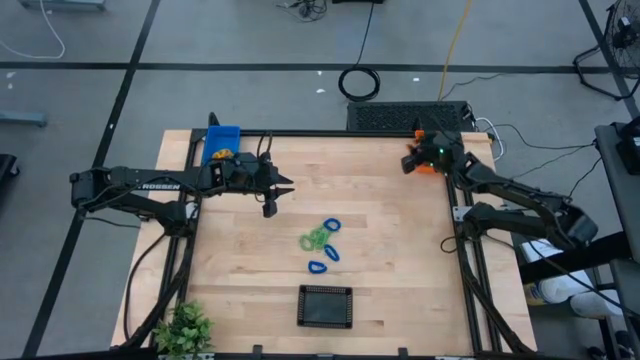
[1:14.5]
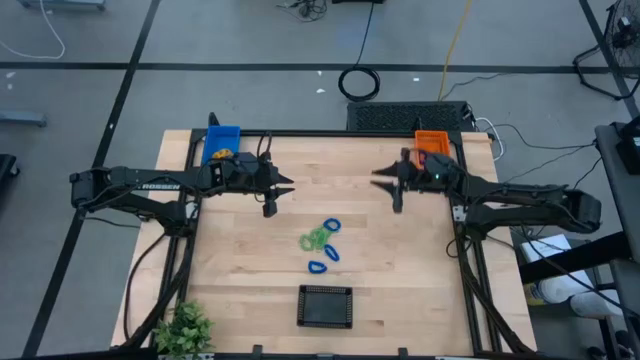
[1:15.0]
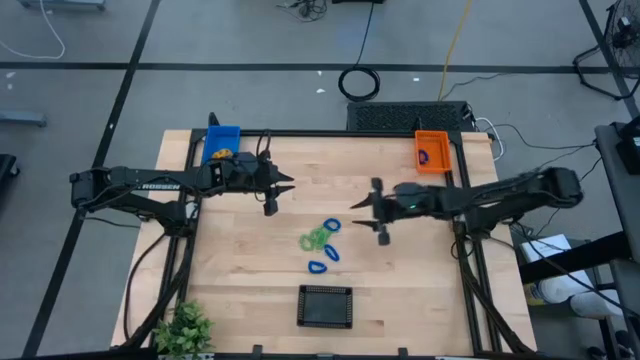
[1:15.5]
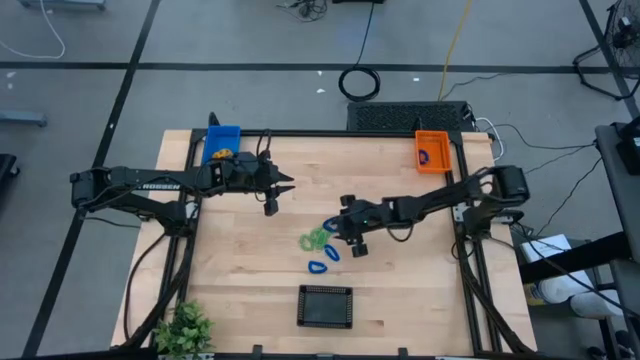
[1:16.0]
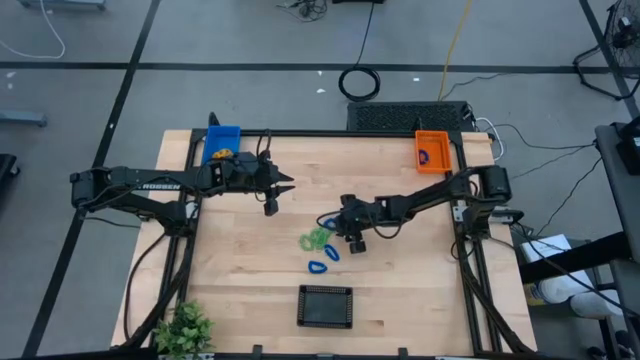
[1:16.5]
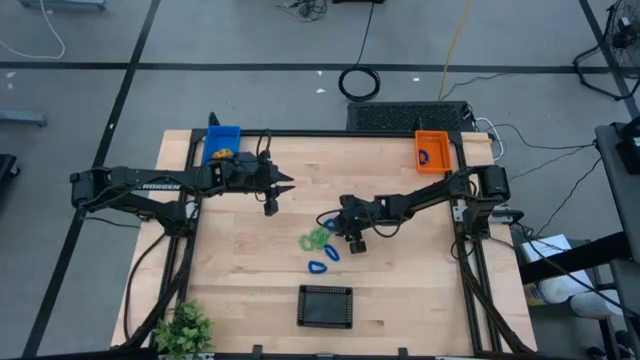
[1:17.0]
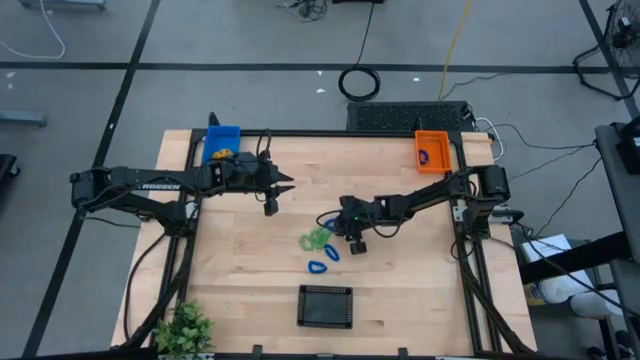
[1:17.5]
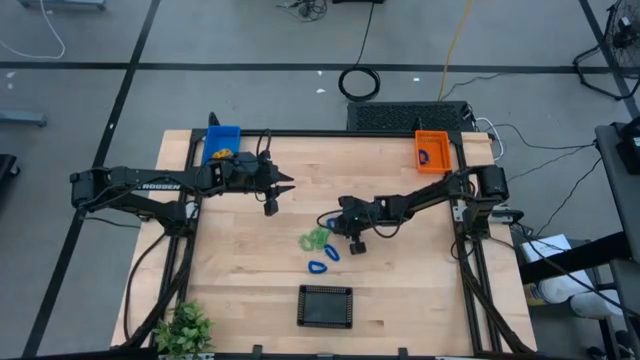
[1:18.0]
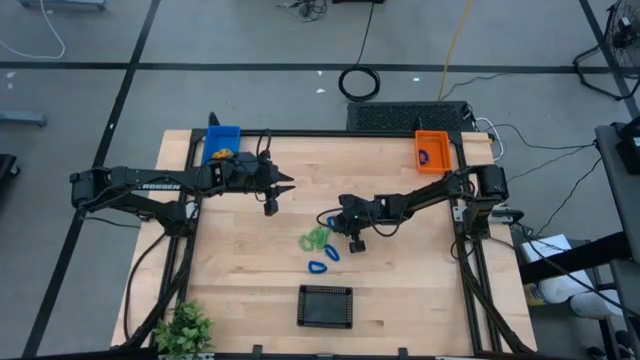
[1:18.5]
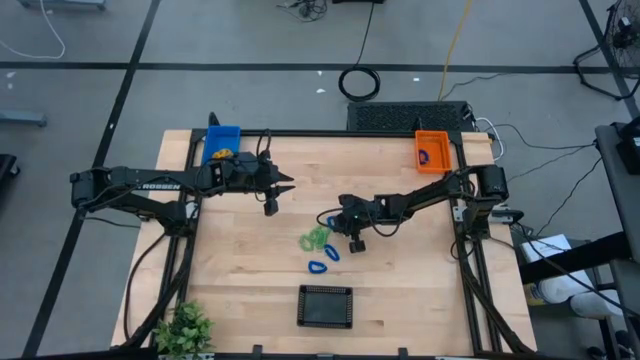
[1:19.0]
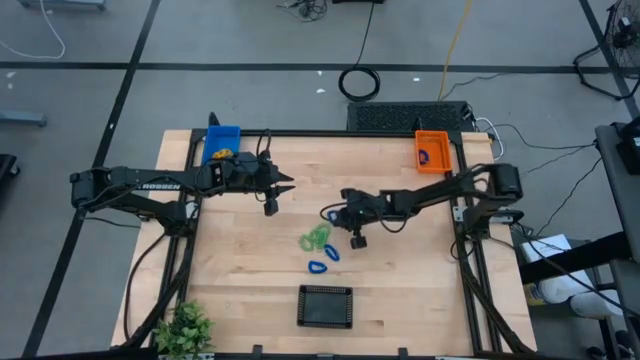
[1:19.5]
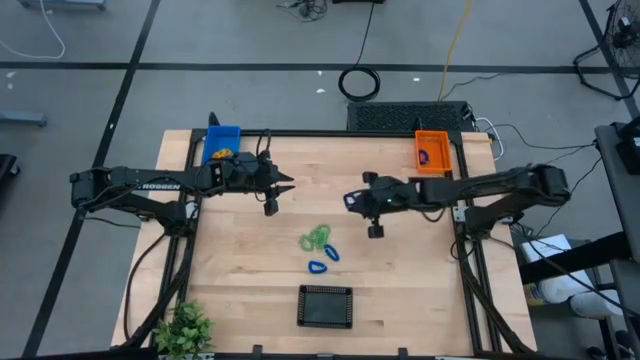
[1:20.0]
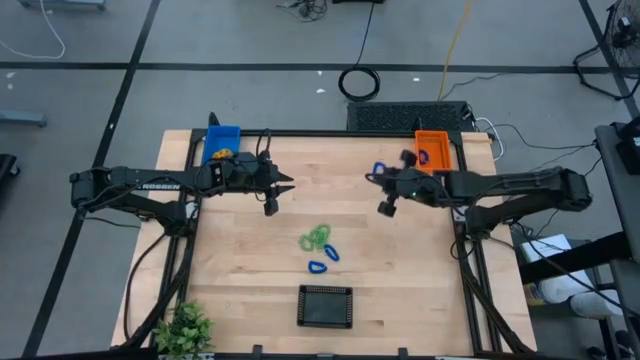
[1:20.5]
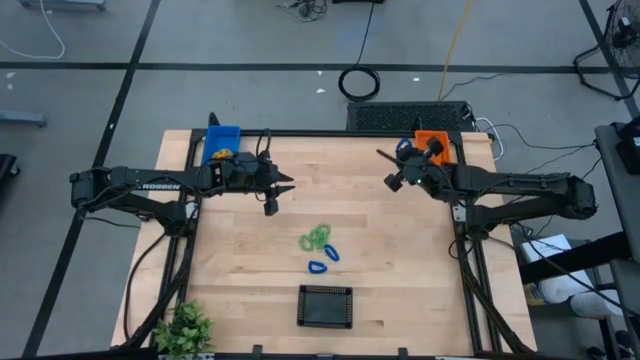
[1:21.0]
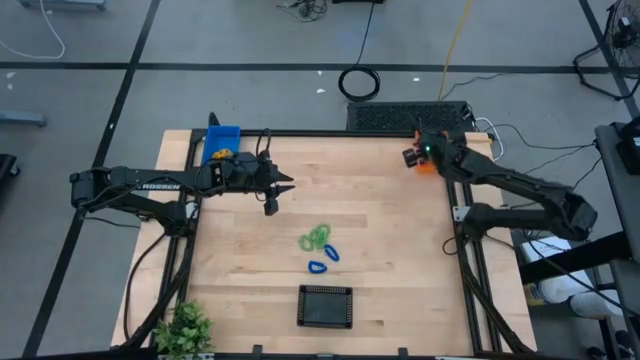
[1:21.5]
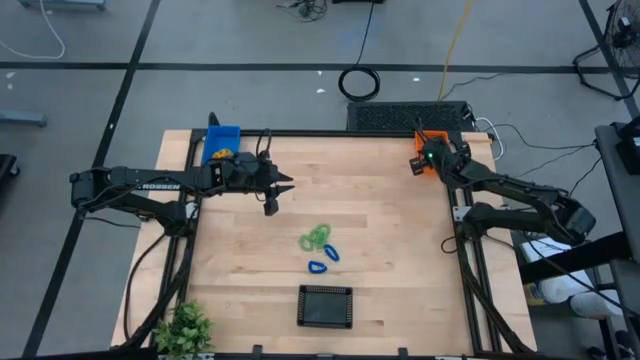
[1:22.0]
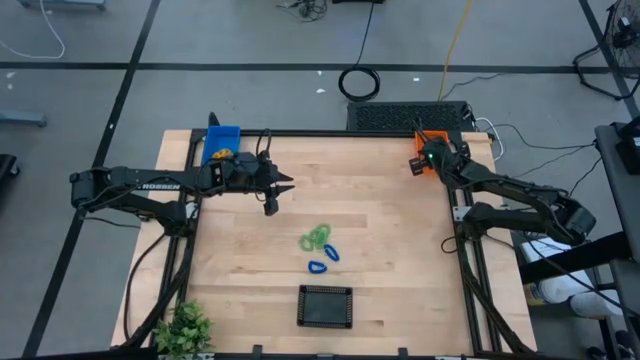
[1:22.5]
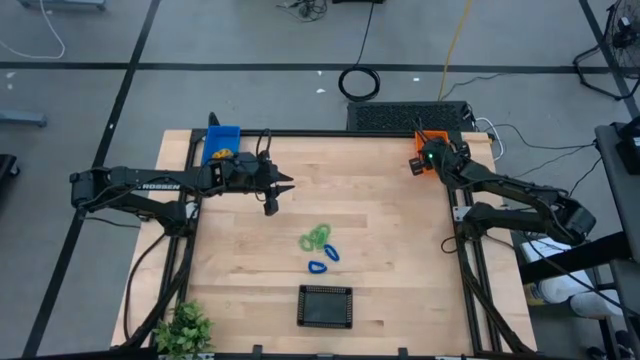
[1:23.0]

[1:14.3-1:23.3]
Task: Sort spring keychains into baskets
Put the blue spring keychain into the orange basket

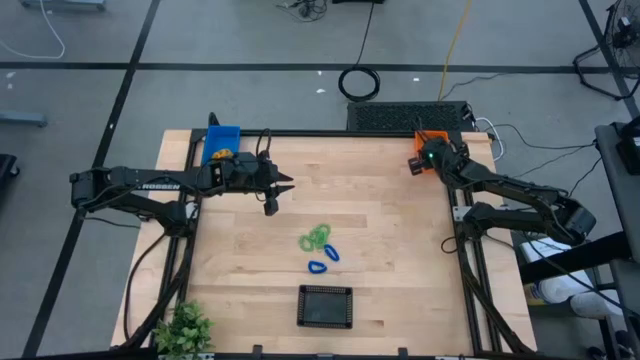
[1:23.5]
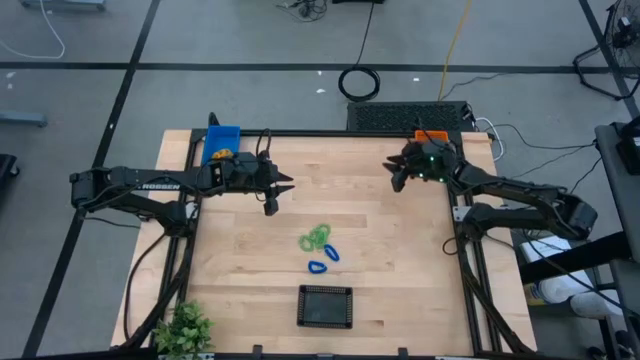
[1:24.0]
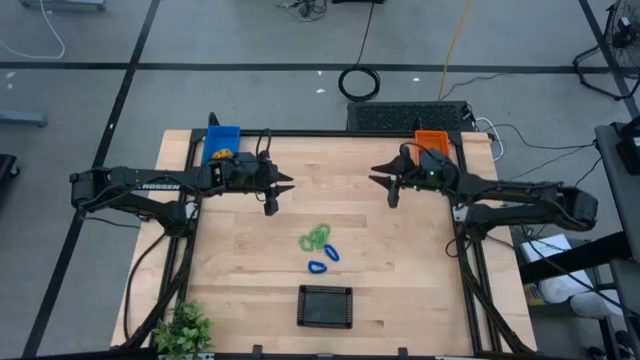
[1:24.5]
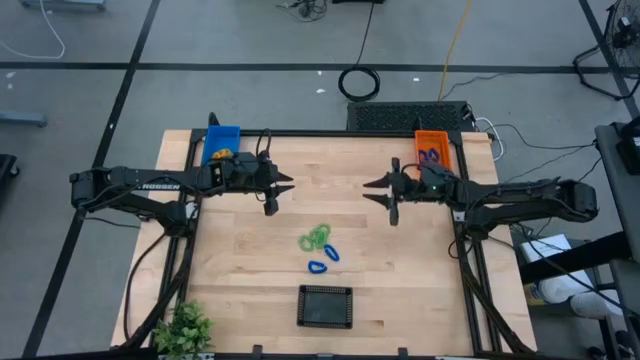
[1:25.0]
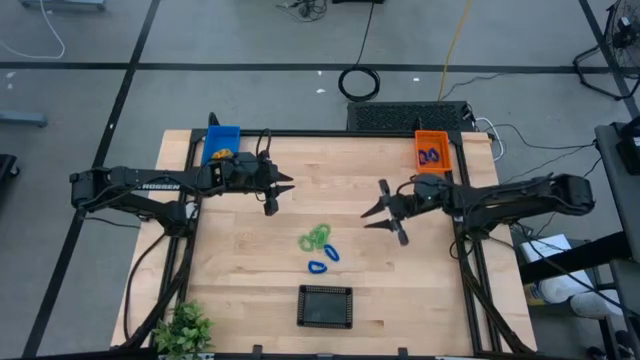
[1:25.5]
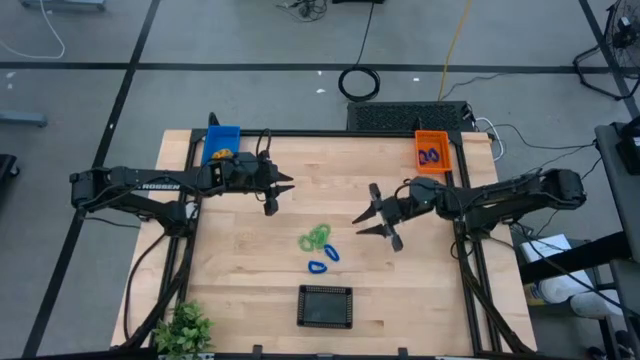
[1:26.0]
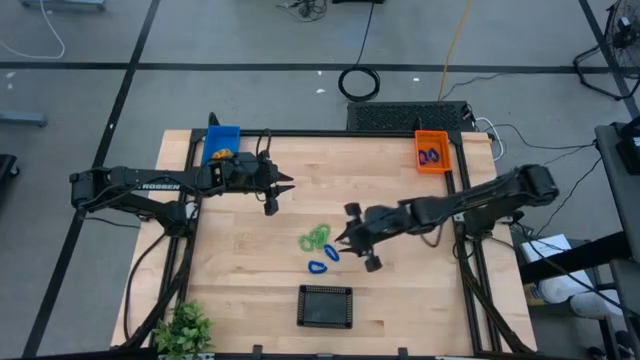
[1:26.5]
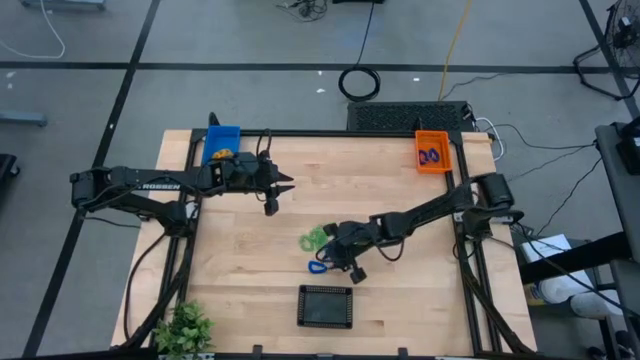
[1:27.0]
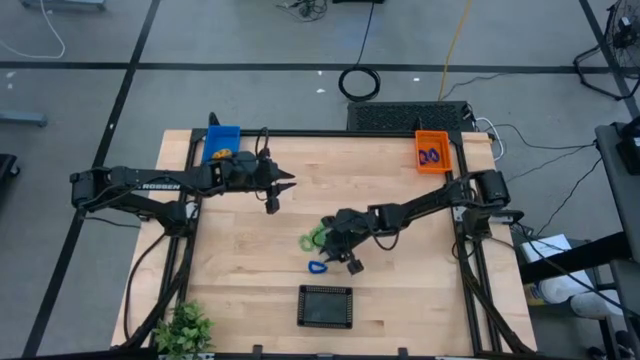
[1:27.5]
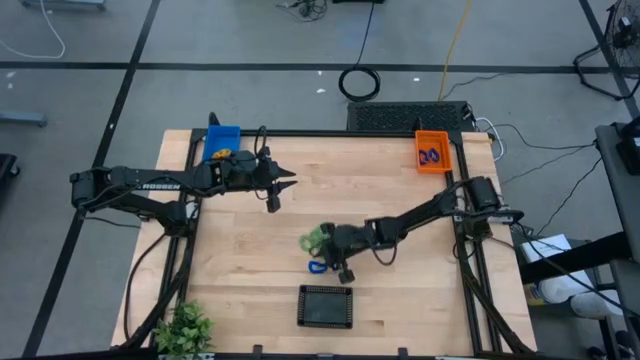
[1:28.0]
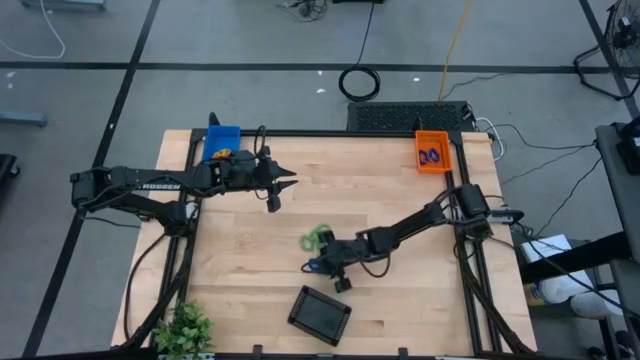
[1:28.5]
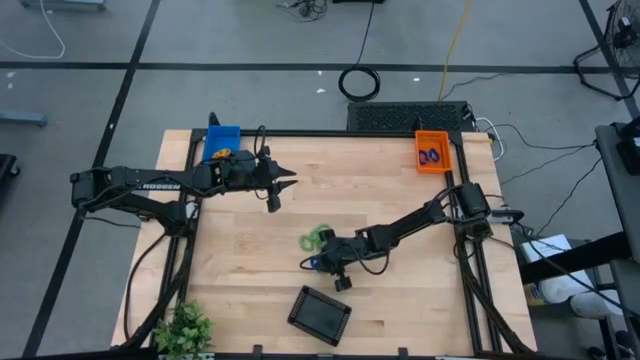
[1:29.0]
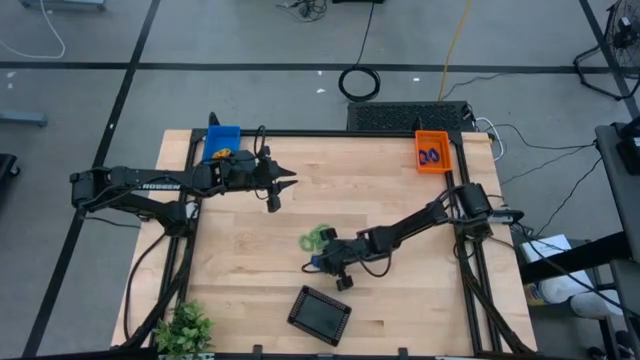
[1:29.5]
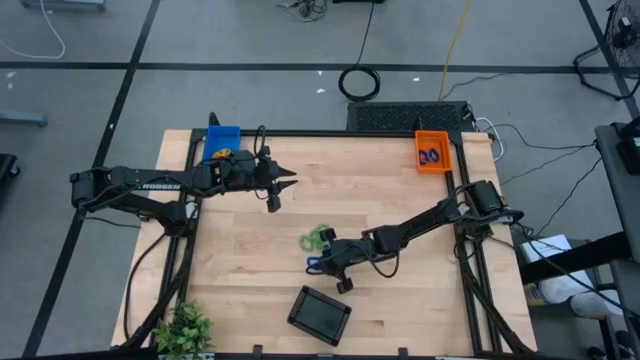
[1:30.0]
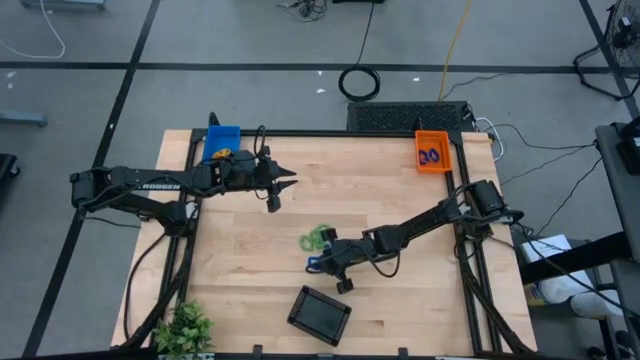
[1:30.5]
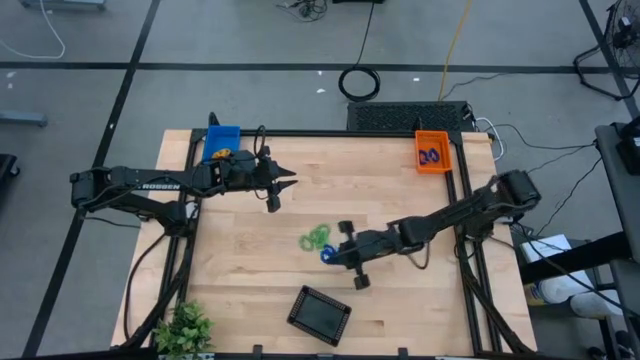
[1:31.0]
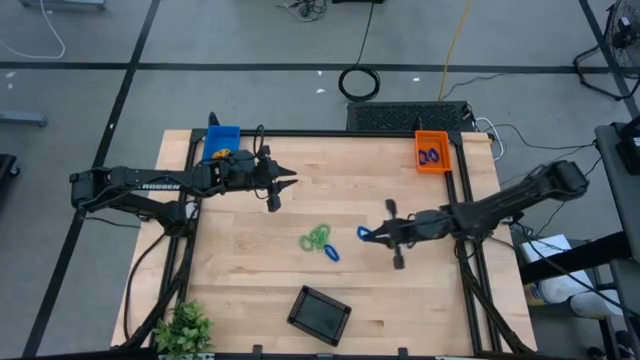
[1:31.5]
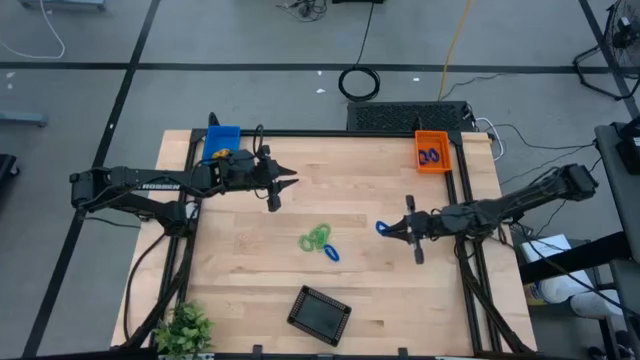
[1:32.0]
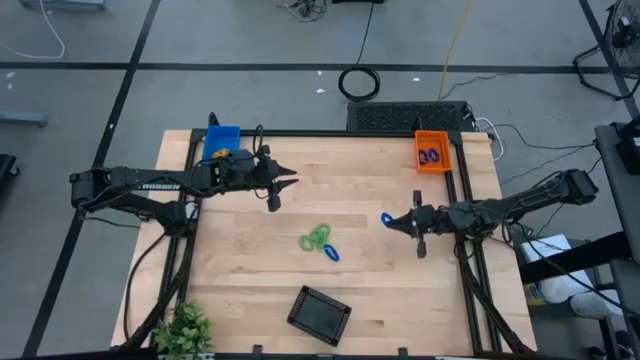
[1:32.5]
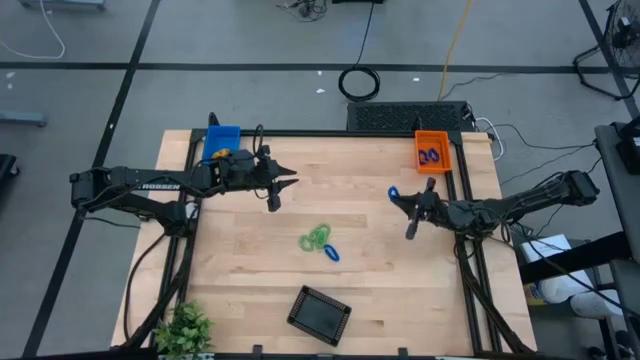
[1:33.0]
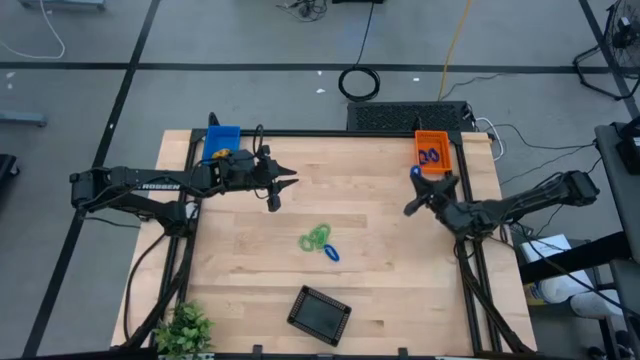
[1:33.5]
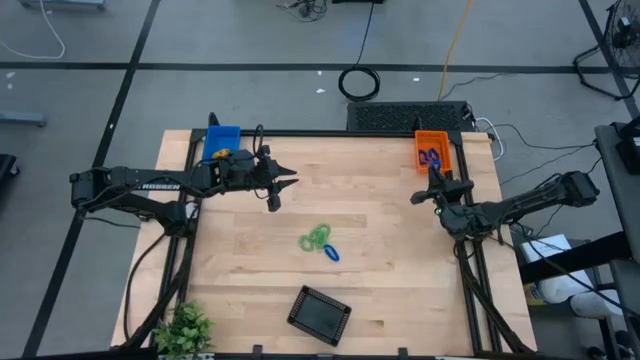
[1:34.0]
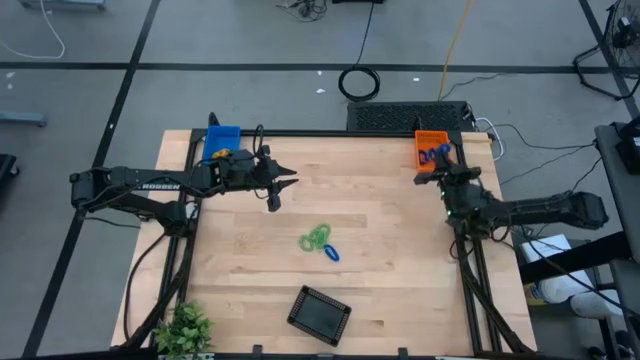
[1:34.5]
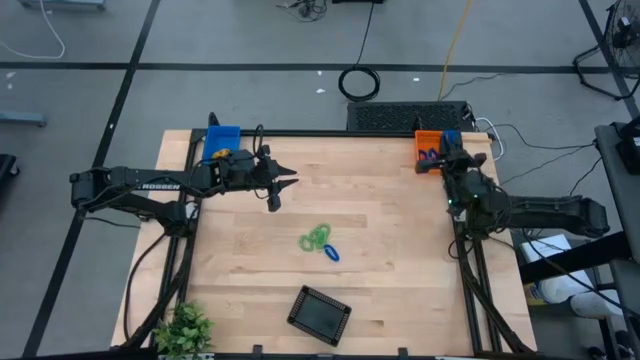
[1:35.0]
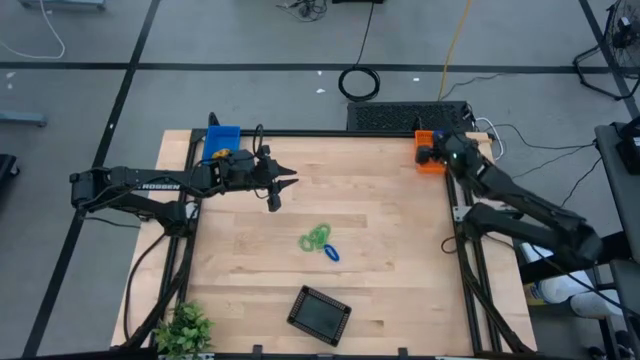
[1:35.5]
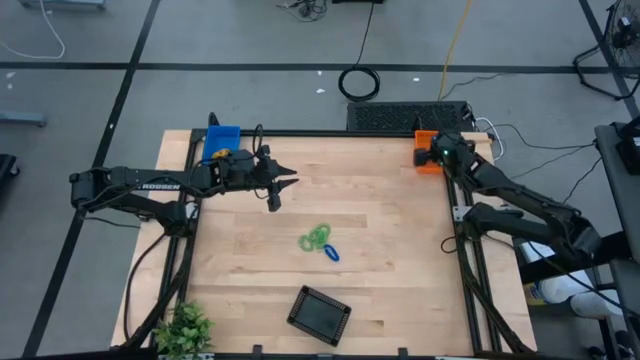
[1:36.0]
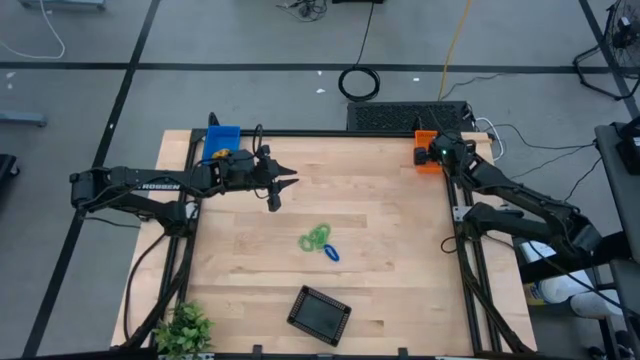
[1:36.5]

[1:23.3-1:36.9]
Put the blue spring keychain into the orange basket
